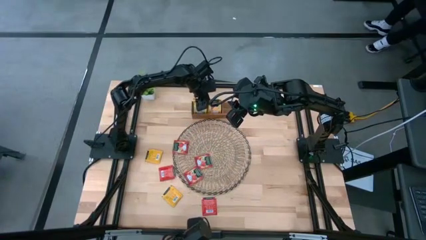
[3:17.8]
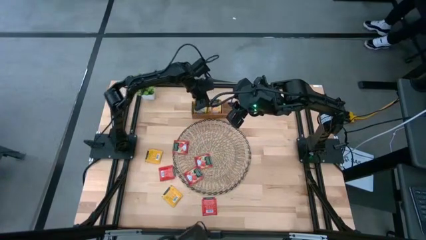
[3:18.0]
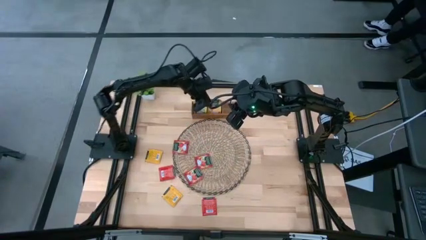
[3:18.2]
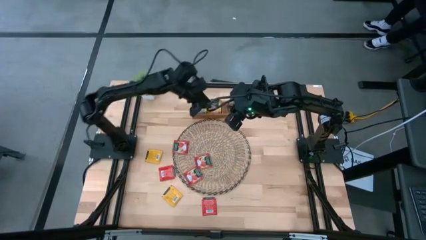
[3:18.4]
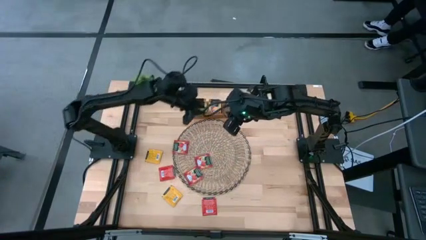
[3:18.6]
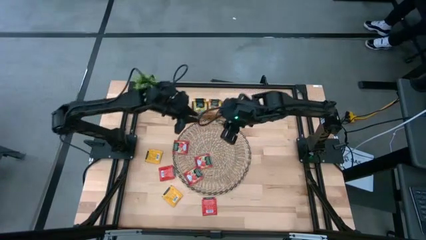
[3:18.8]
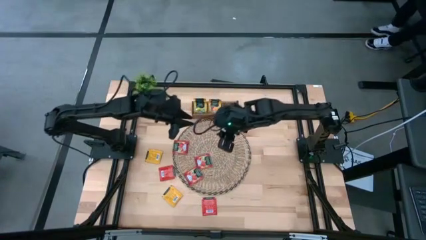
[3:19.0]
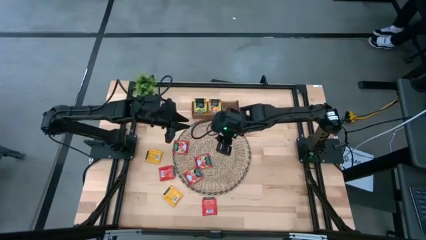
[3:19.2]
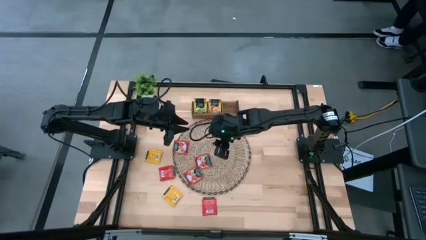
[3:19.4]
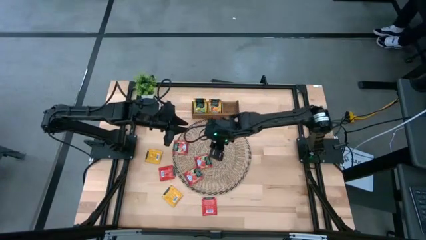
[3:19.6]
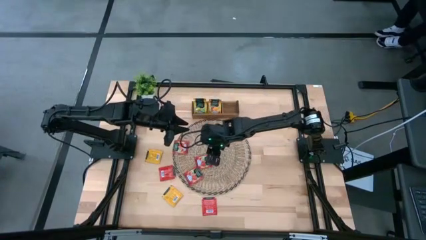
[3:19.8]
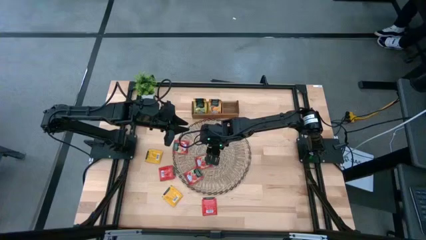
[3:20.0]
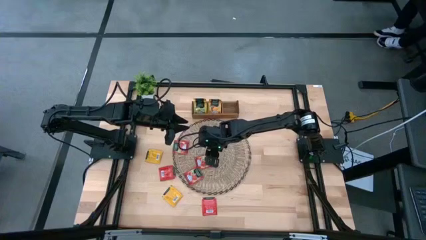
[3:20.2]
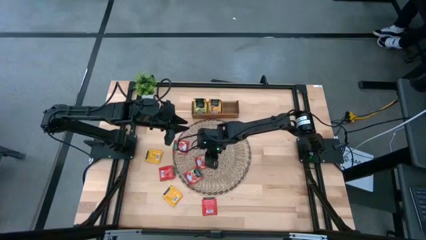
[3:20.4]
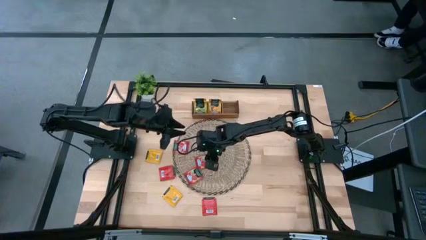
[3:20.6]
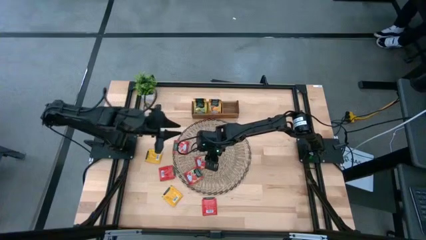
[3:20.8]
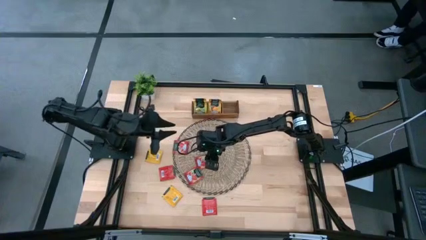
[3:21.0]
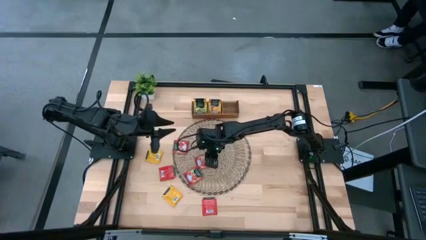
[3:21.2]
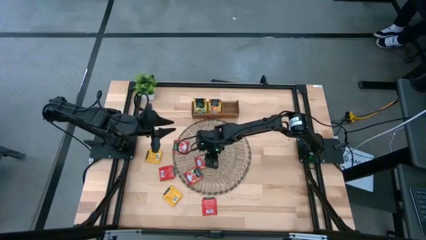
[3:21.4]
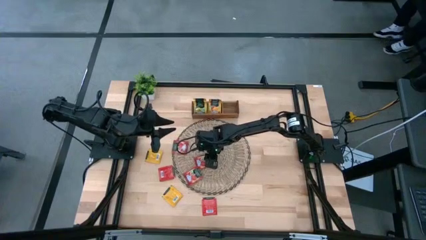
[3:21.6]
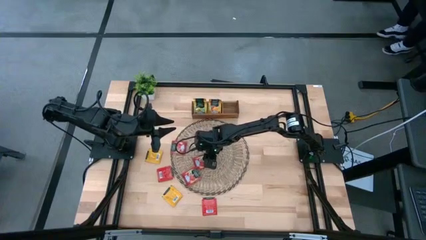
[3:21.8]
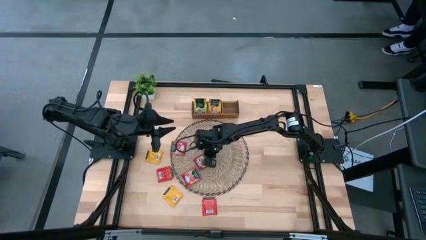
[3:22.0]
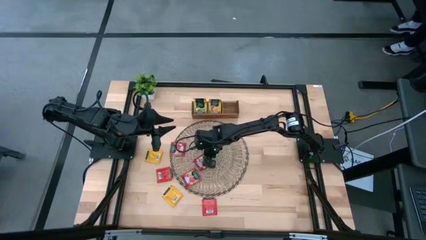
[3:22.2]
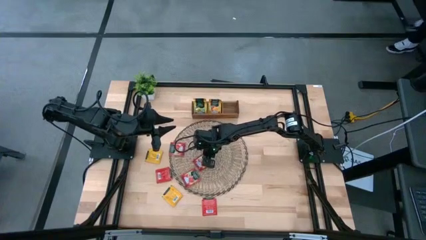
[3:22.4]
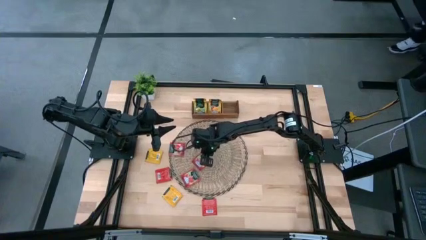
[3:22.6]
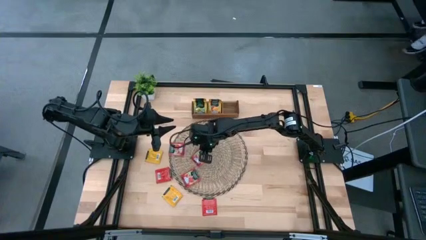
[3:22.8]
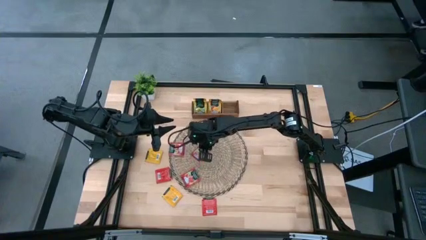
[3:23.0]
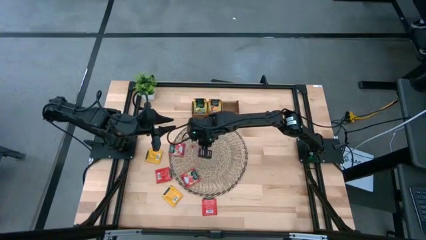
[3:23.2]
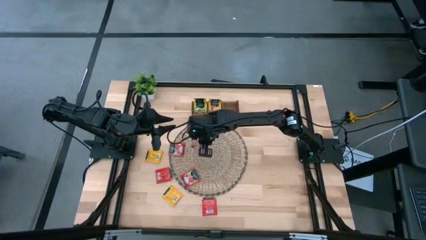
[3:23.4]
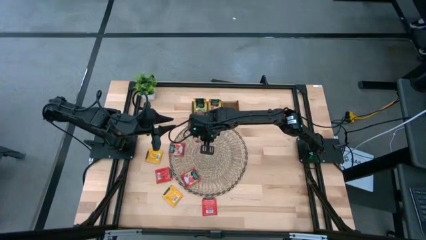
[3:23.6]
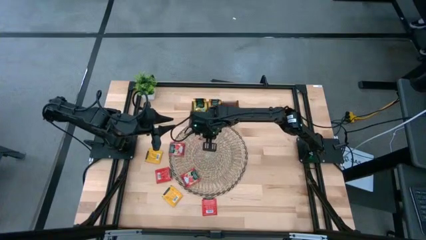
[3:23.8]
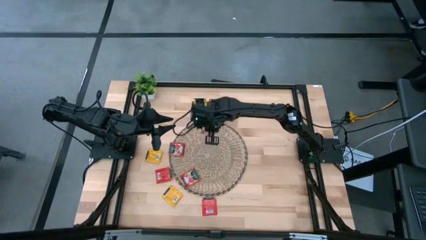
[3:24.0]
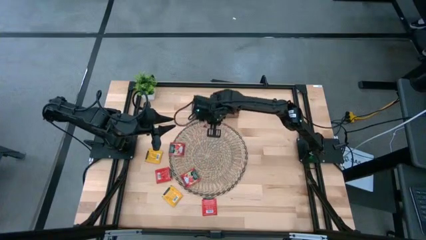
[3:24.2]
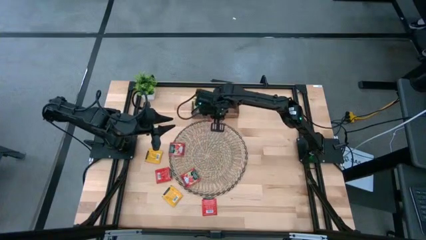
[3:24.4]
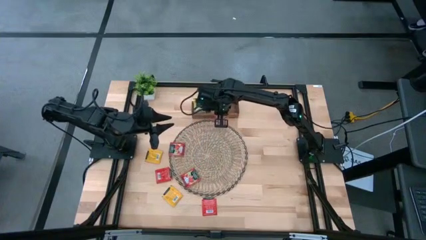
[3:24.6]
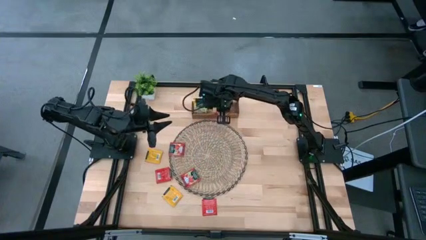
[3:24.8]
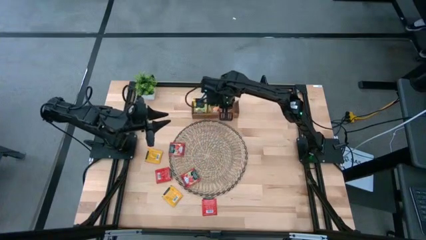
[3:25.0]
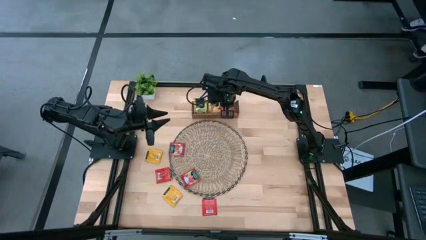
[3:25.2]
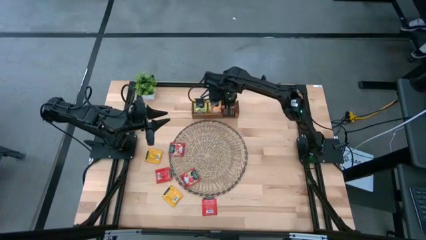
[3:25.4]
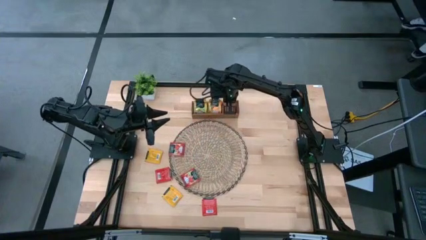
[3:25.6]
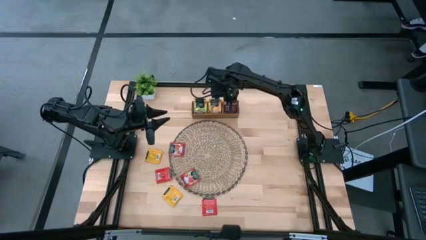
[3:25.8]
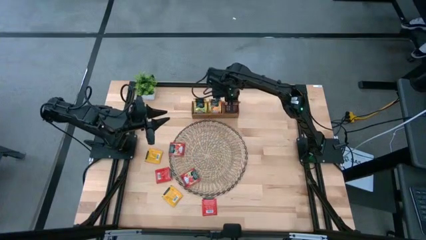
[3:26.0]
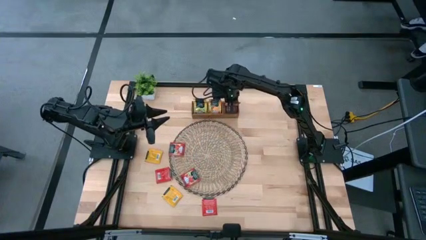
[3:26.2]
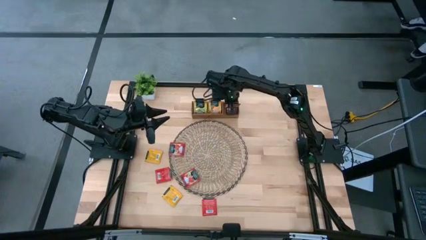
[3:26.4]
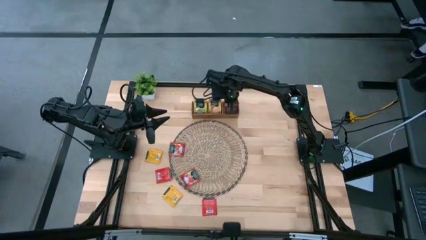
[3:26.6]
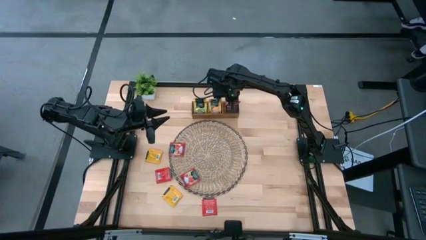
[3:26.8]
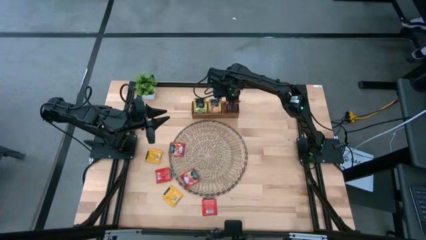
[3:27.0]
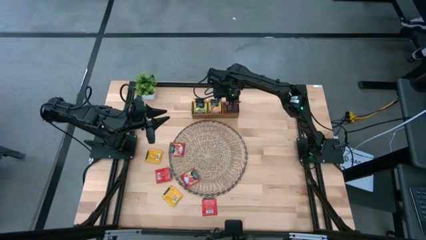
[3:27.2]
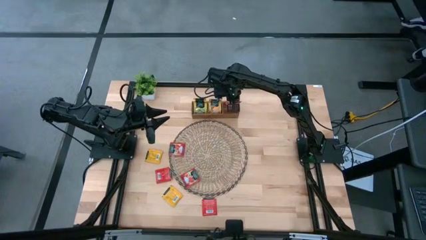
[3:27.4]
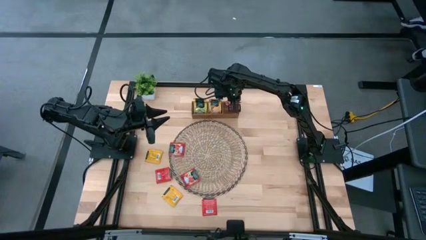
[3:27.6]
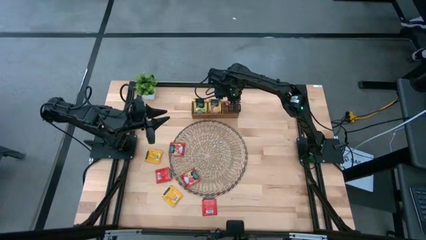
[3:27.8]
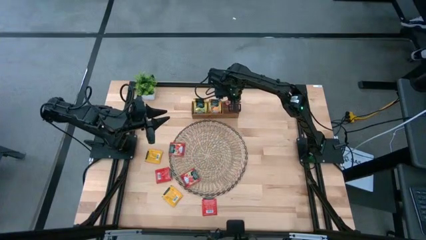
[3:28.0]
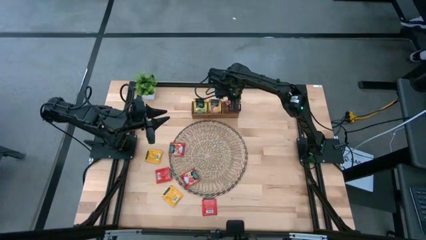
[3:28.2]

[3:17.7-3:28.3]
Task: Pick & Place Tea
Put the red tea bag into the right of the wooden organizer
